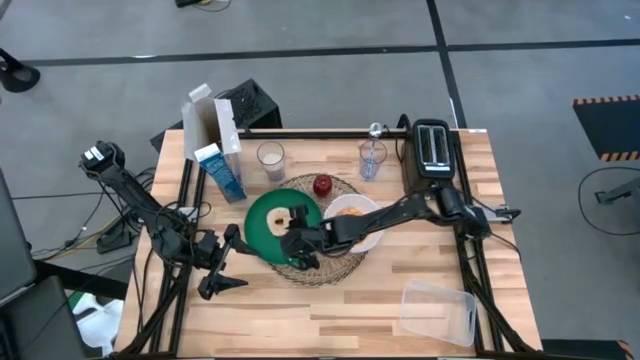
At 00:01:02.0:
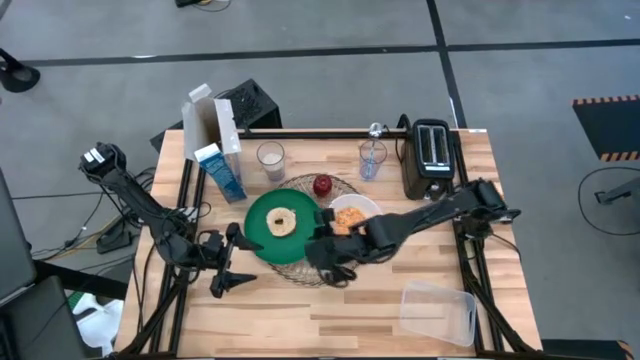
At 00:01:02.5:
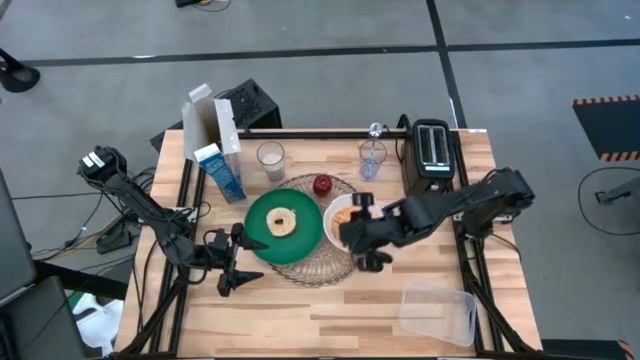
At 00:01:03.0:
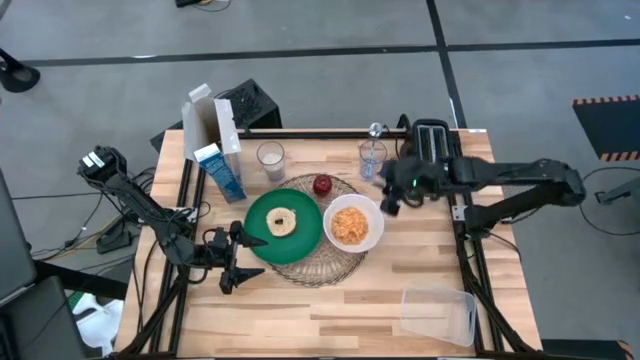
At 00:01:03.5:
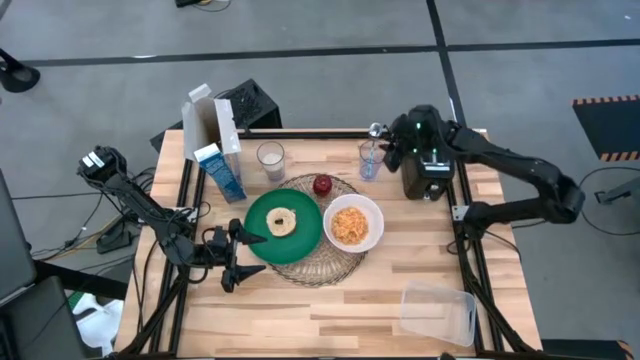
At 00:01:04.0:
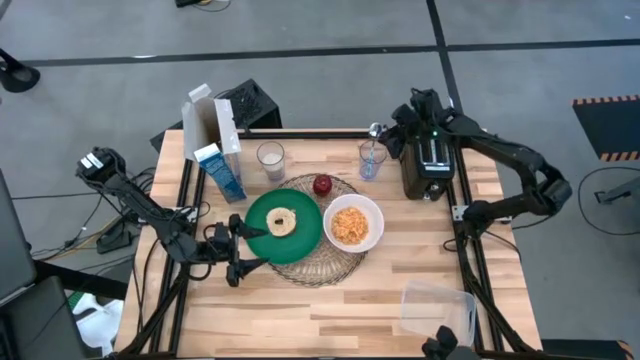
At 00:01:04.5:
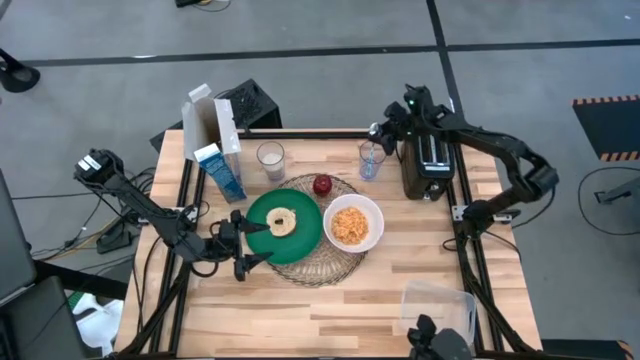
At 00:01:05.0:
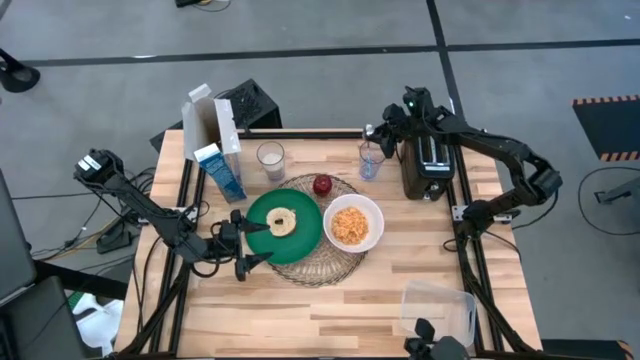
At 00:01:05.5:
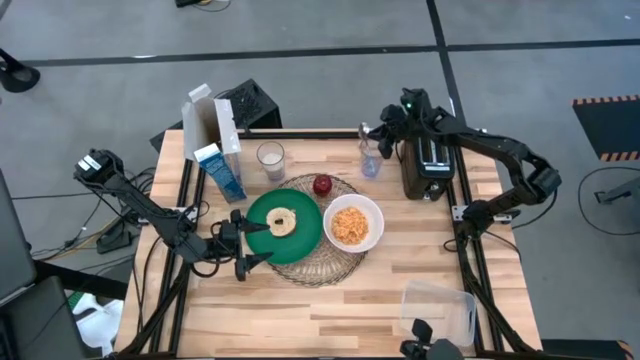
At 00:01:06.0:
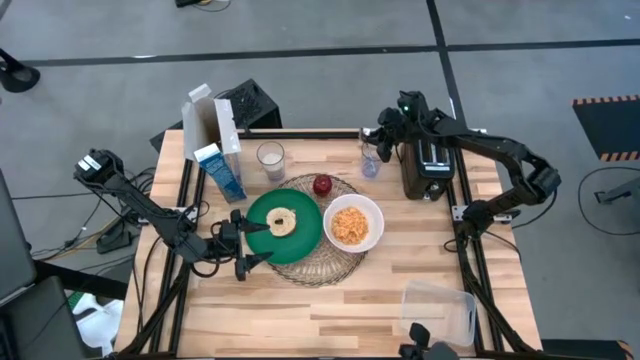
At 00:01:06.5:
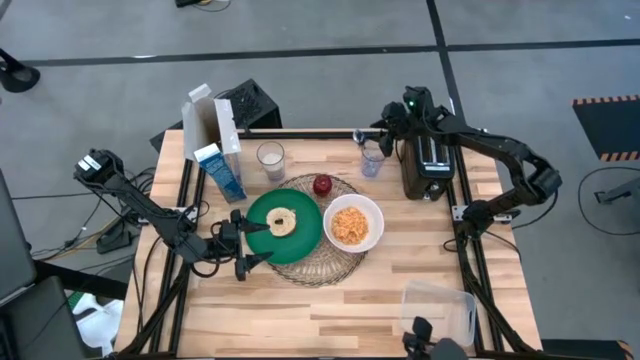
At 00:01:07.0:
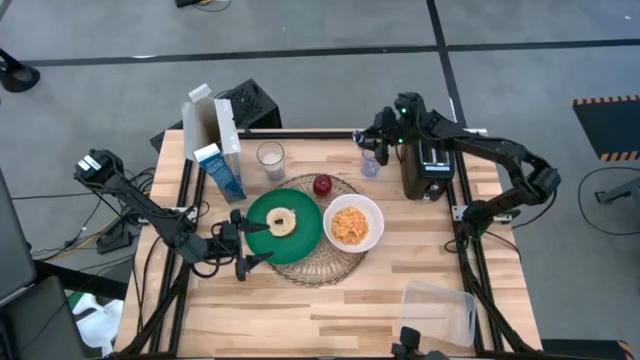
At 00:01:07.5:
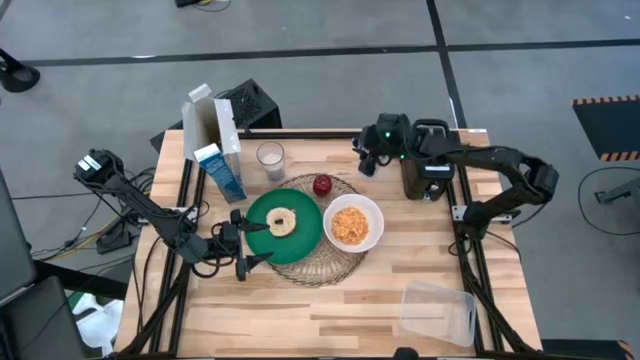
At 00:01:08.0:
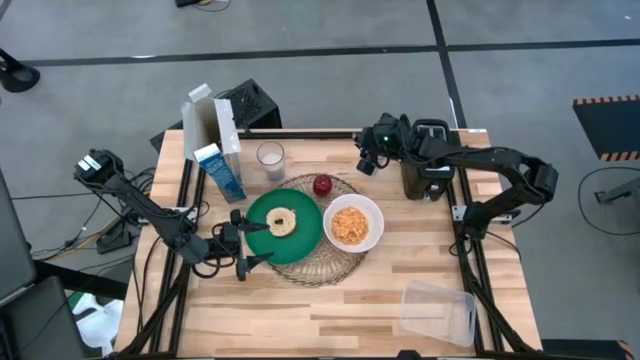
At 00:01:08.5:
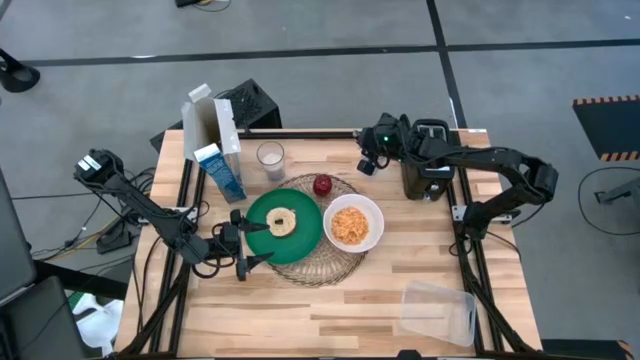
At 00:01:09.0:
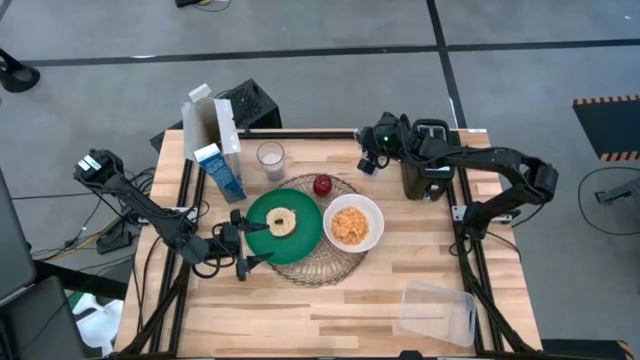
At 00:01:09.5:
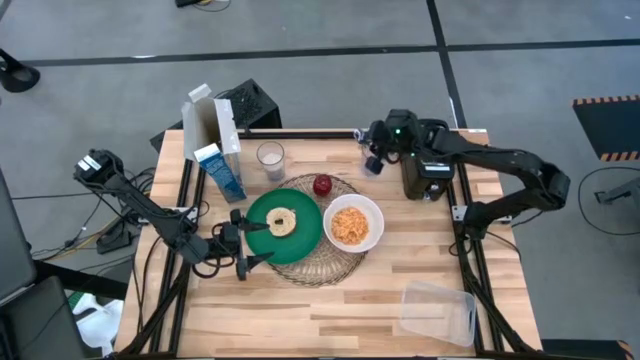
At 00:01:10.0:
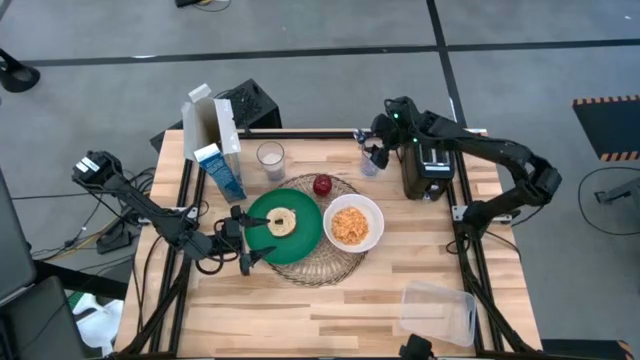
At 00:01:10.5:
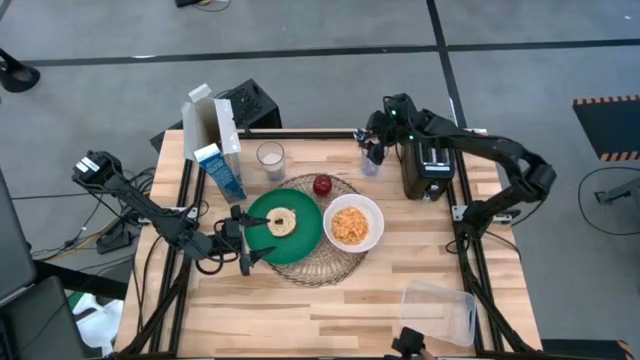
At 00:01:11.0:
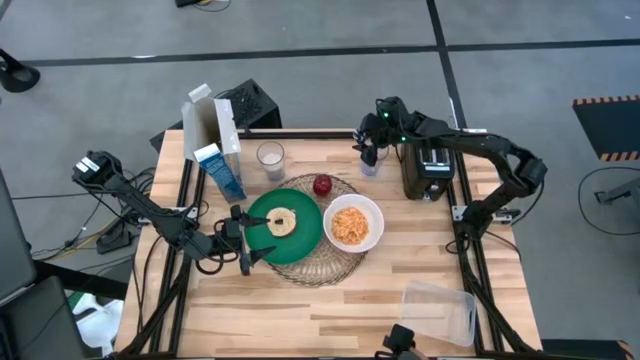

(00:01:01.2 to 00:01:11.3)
Task: Arrange a breakfast setting
Put the white spoon on the left side of the table beside the placemat

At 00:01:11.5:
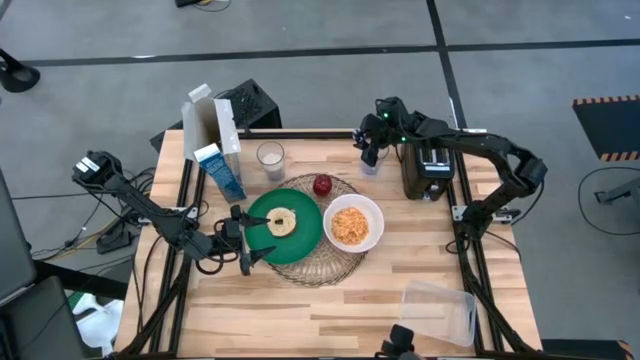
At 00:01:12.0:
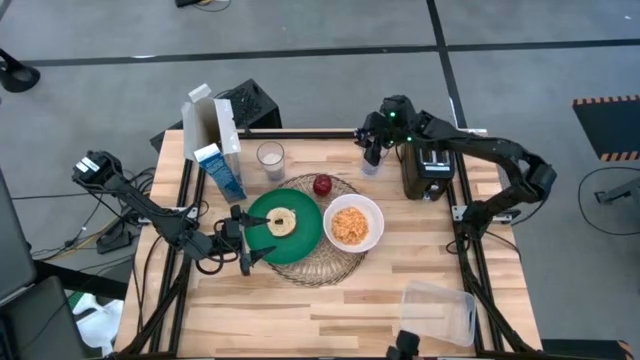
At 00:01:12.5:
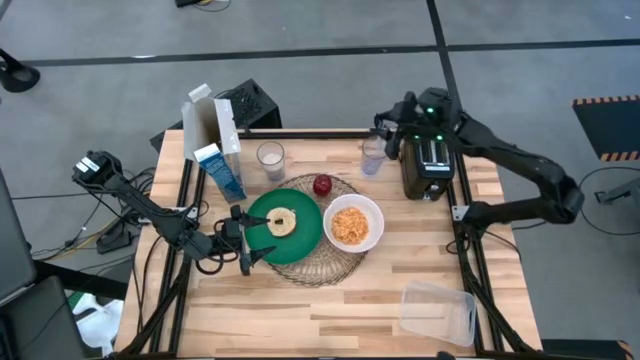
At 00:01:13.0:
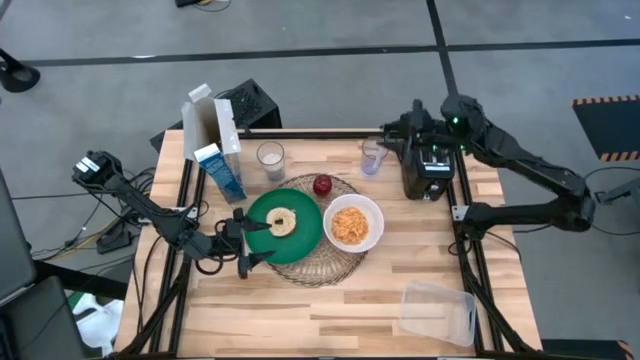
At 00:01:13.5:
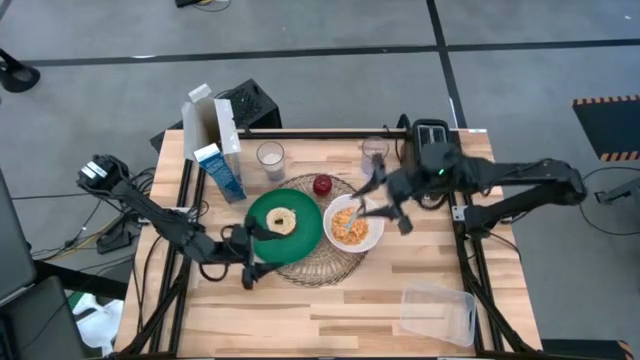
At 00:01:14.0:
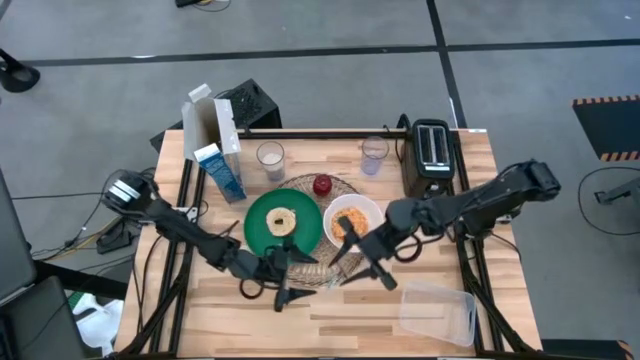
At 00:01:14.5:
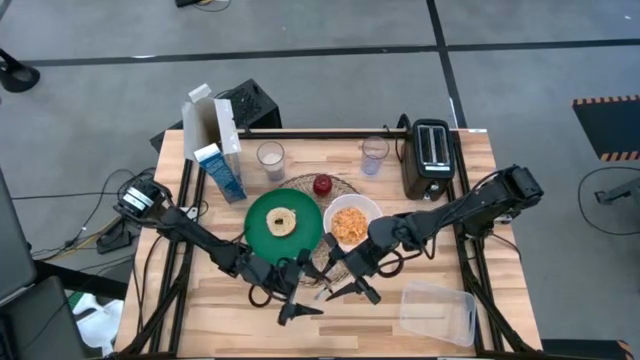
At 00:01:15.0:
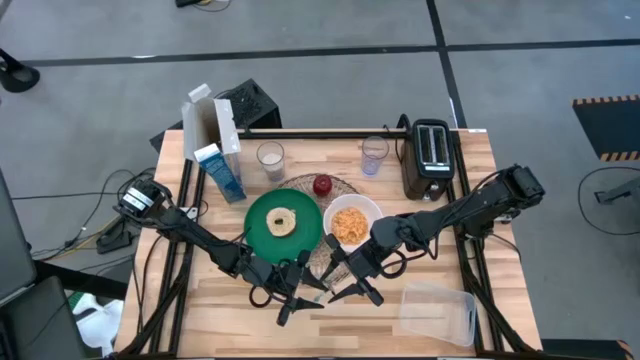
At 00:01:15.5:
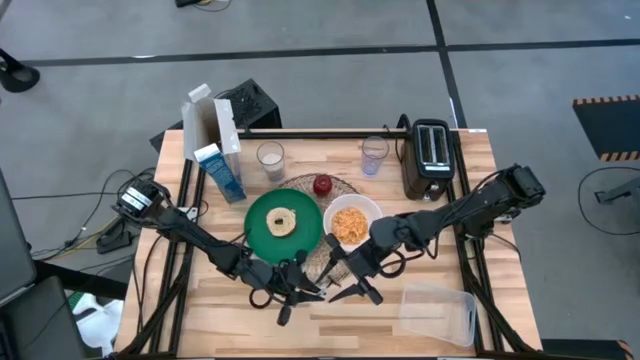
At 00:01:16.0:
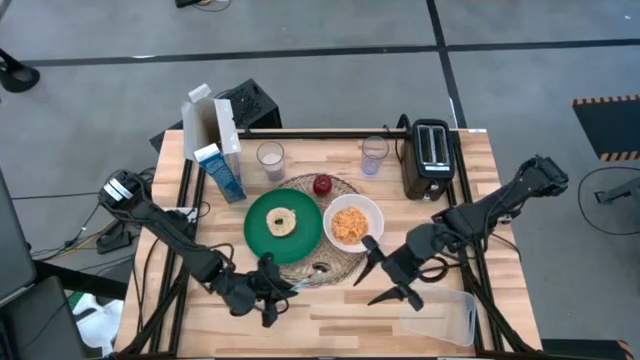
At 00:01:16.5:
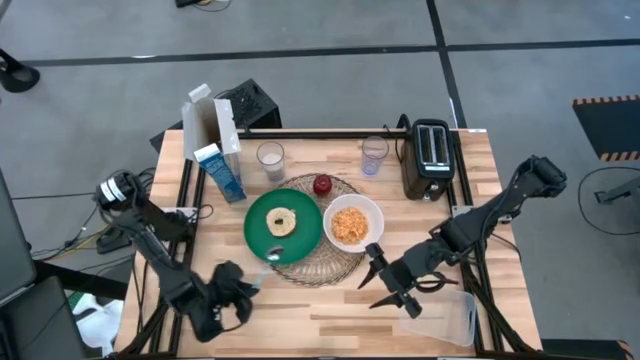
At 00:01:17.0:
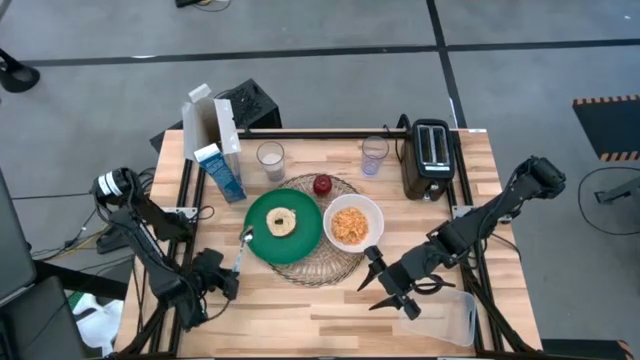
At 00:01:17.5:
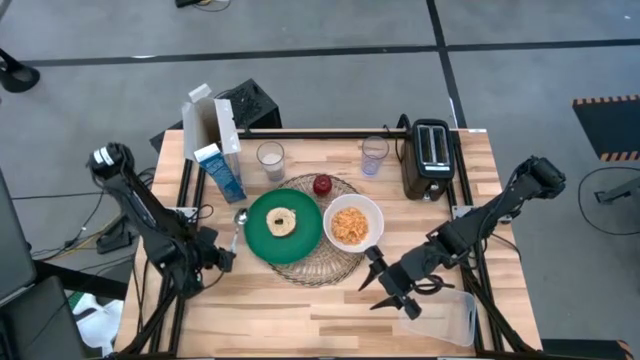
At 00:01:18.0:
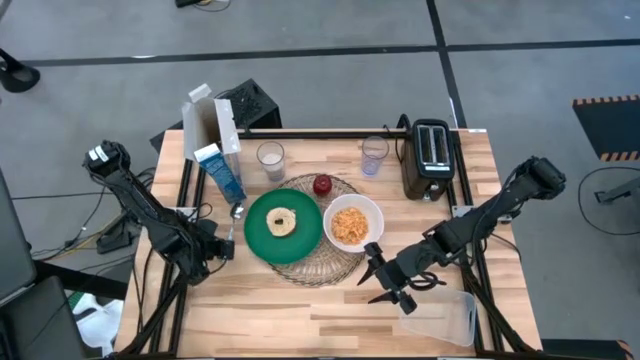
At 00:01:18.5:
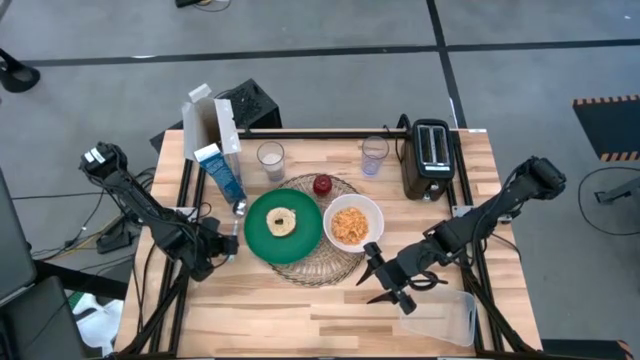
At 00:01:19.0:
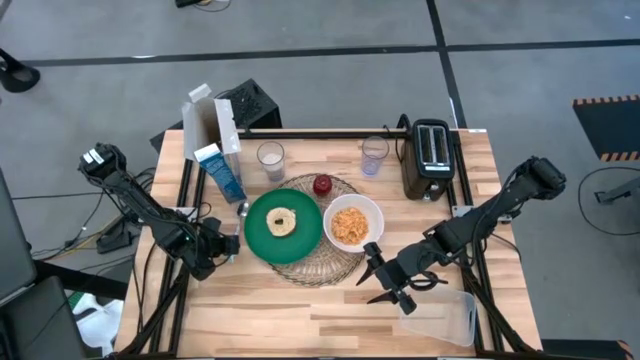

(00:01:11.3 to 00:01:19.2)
Put the blue spoon on the left side of the green plate from the transparent drinking glass

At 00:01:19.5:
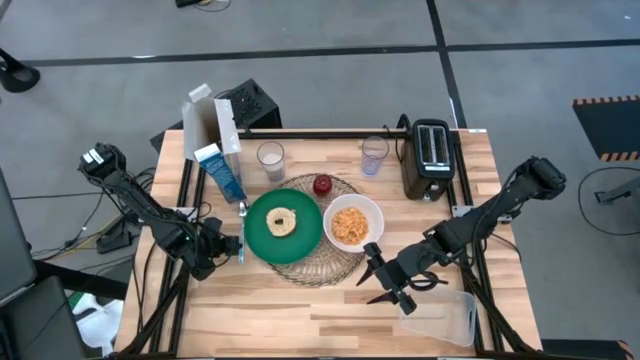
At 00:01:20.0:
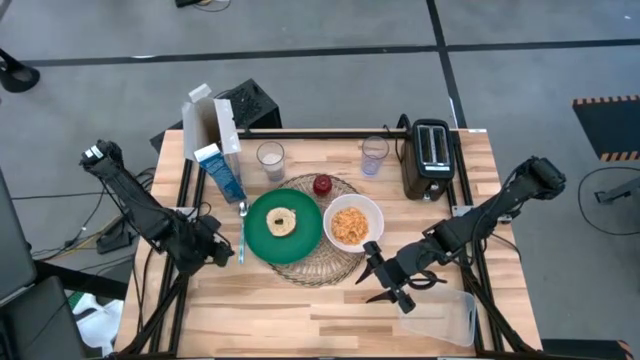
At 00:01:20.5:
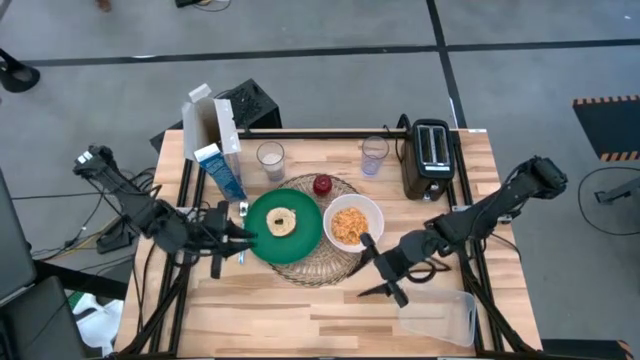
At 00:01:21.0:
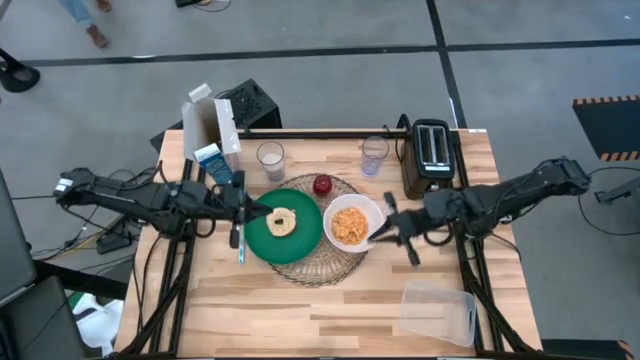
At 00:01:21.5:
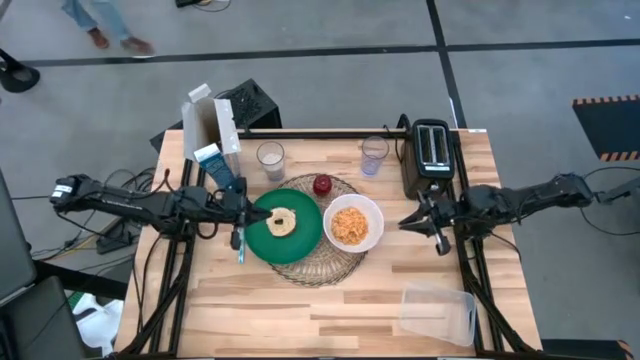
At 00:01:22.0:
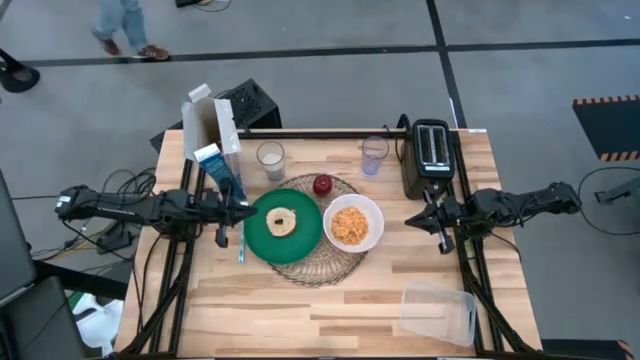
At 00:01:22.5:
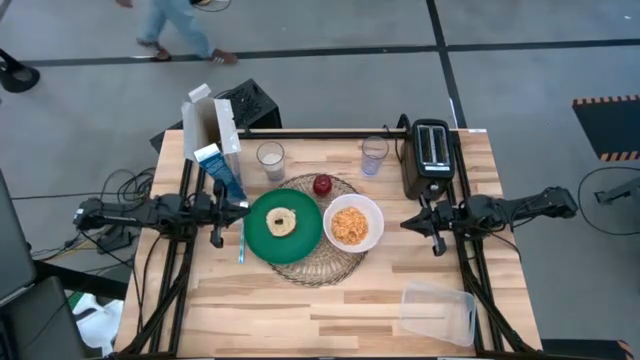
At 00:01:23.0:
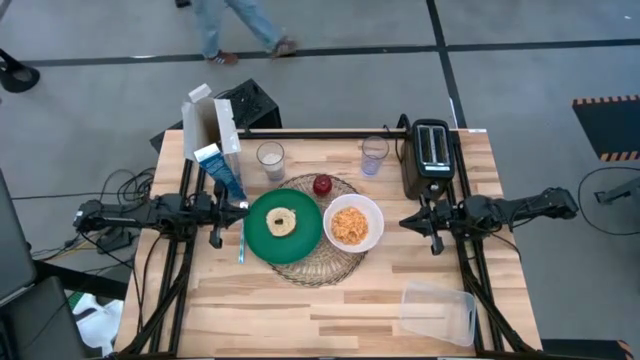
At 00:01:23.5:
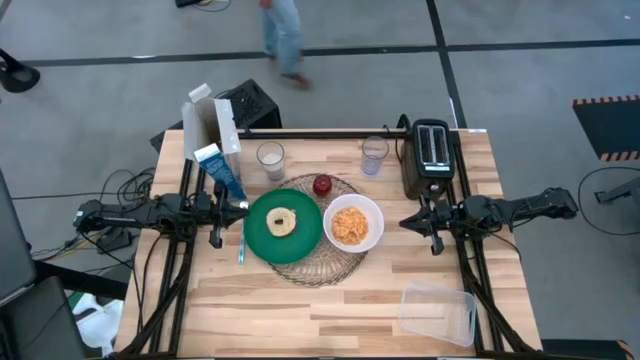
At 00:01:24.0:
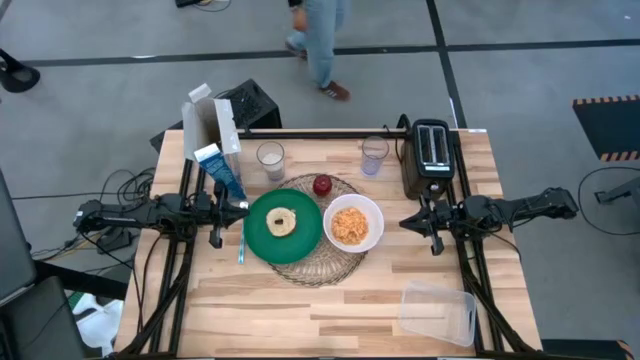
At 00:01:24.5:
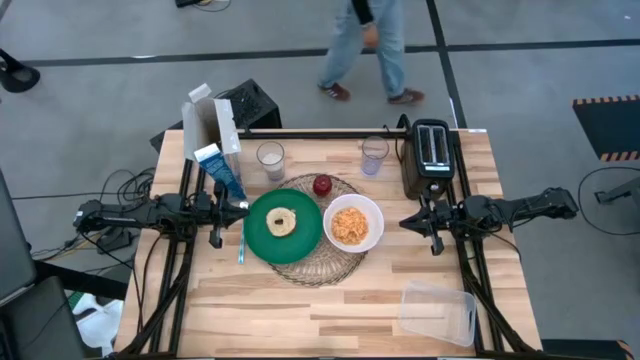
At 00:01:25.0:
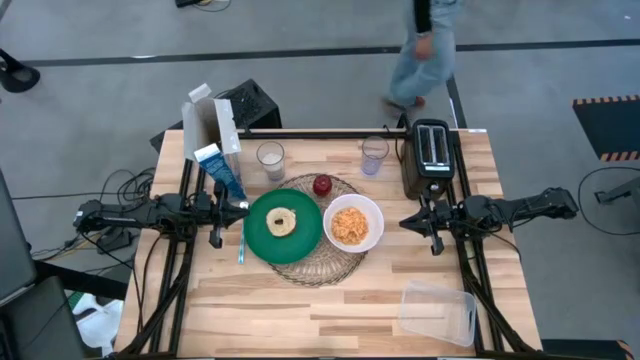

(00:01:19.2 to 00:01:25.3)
Return to Home Position
